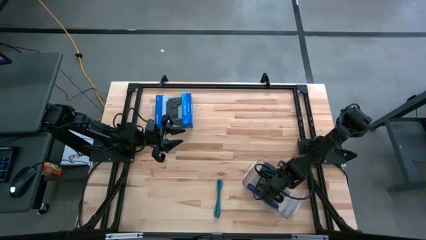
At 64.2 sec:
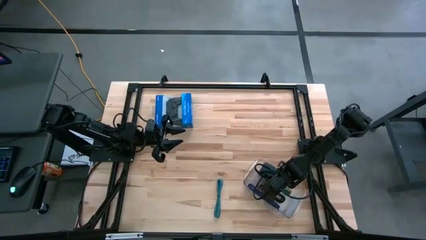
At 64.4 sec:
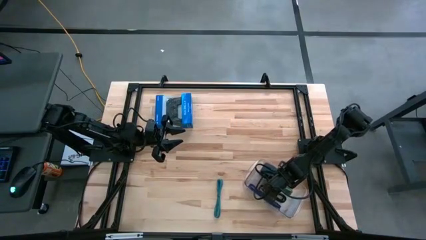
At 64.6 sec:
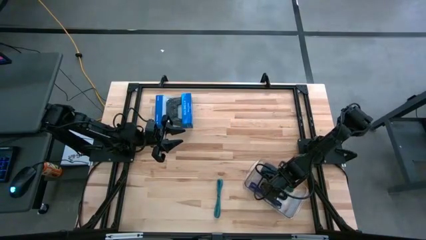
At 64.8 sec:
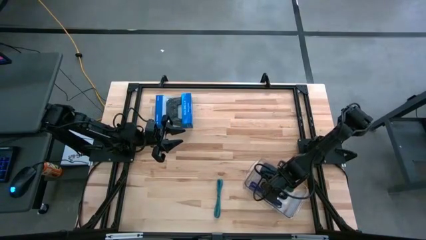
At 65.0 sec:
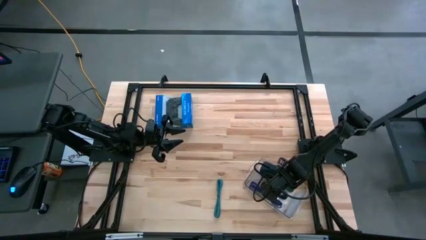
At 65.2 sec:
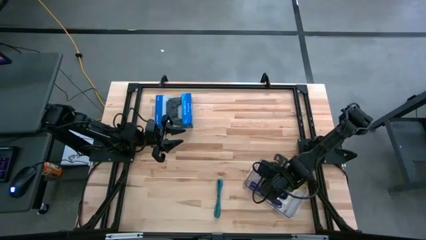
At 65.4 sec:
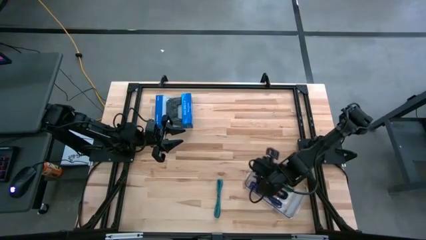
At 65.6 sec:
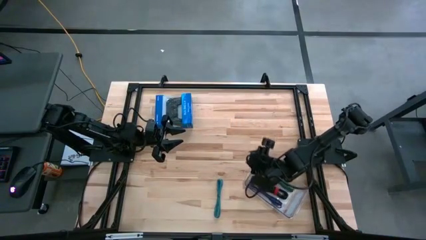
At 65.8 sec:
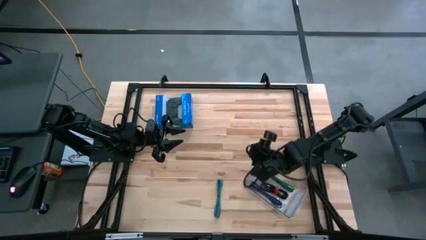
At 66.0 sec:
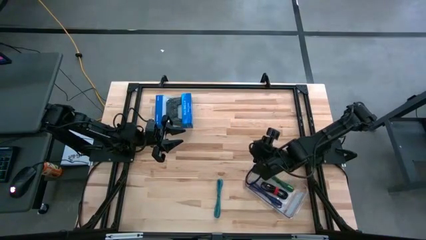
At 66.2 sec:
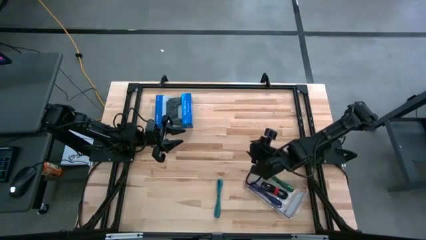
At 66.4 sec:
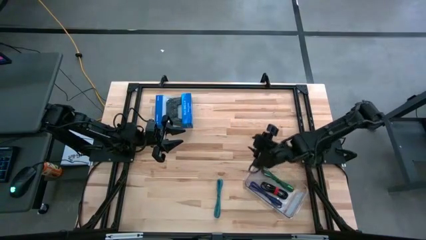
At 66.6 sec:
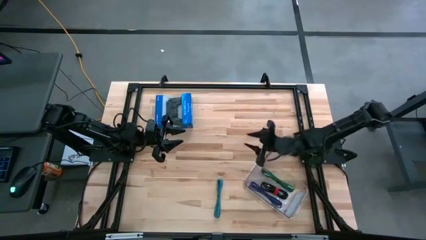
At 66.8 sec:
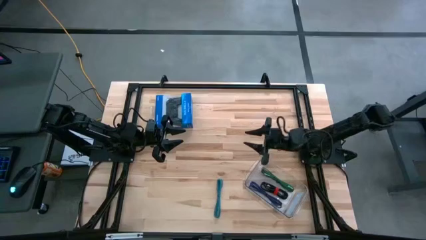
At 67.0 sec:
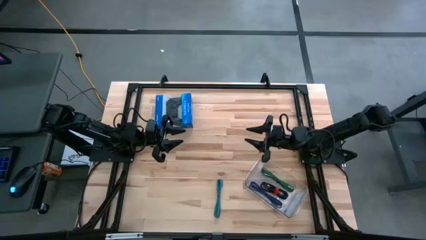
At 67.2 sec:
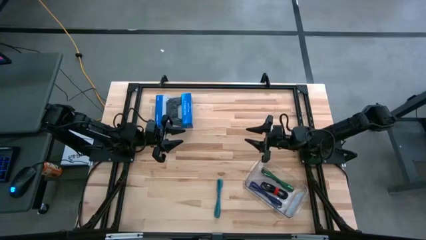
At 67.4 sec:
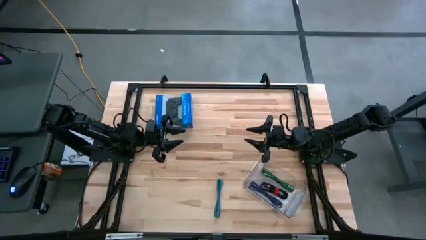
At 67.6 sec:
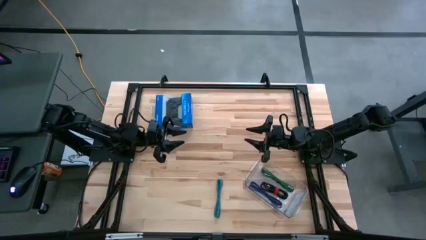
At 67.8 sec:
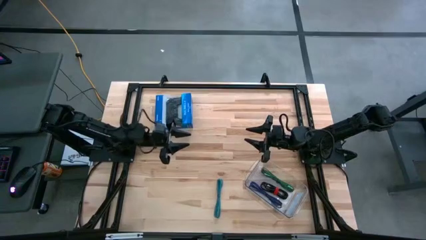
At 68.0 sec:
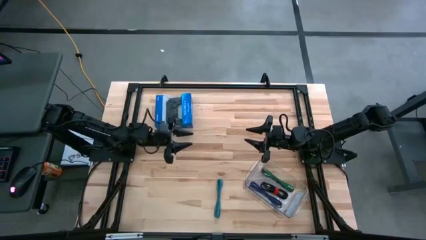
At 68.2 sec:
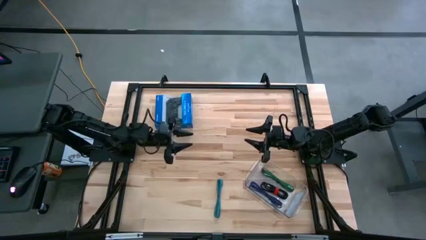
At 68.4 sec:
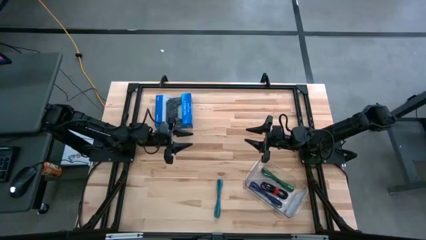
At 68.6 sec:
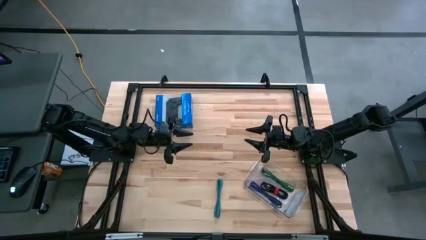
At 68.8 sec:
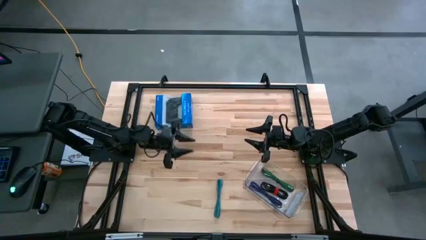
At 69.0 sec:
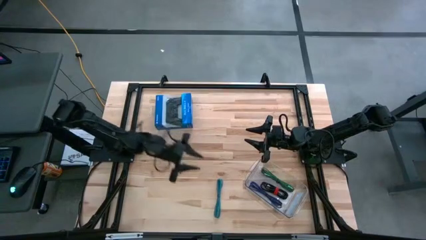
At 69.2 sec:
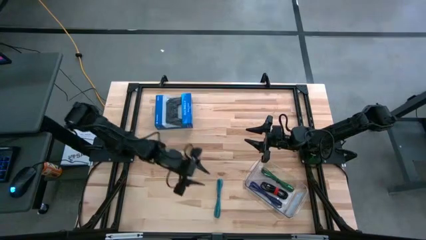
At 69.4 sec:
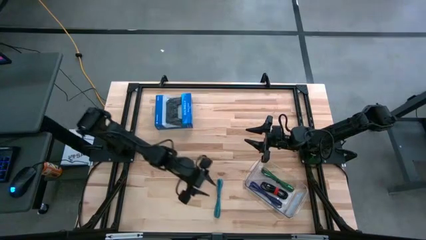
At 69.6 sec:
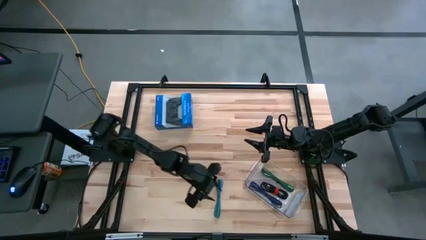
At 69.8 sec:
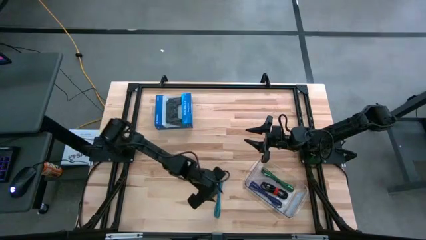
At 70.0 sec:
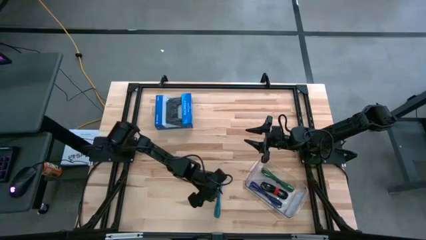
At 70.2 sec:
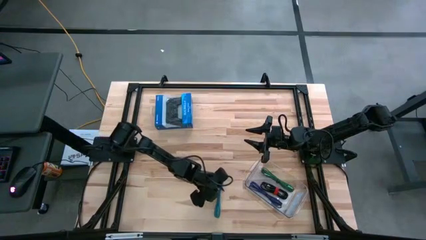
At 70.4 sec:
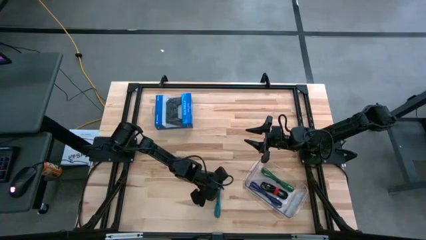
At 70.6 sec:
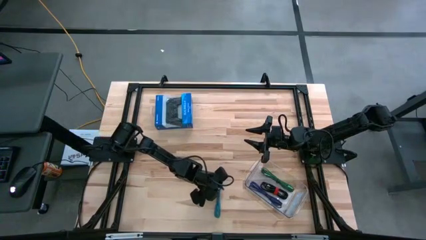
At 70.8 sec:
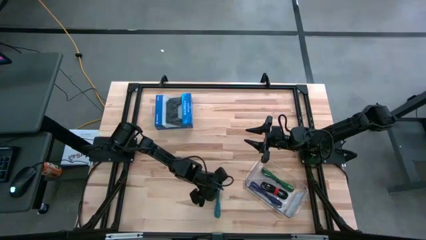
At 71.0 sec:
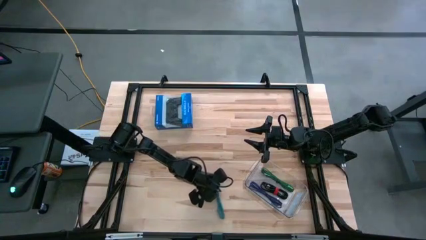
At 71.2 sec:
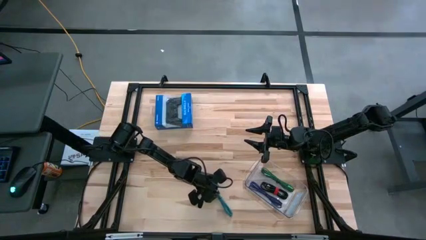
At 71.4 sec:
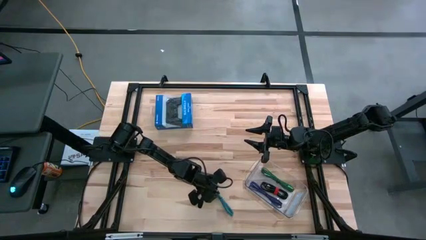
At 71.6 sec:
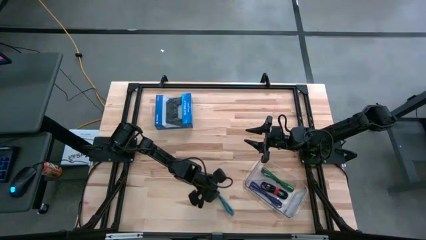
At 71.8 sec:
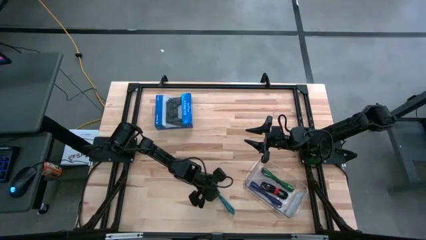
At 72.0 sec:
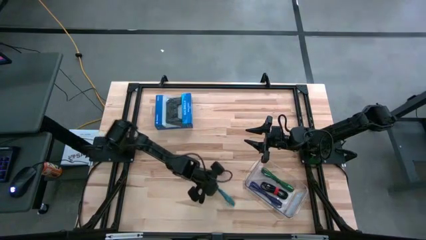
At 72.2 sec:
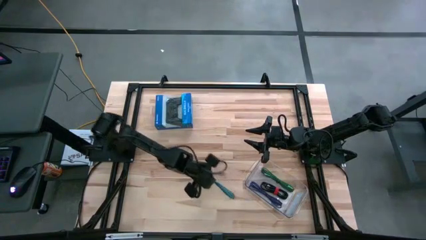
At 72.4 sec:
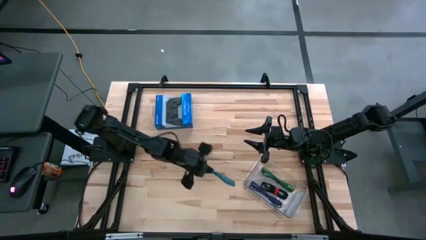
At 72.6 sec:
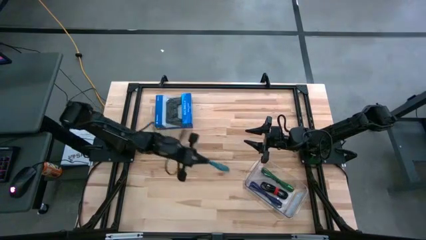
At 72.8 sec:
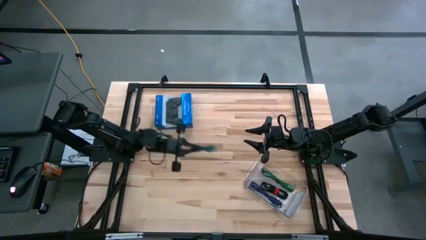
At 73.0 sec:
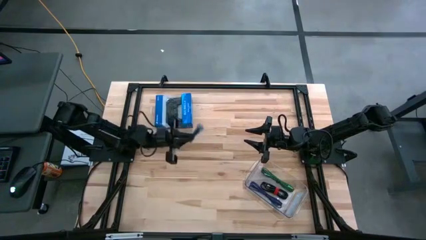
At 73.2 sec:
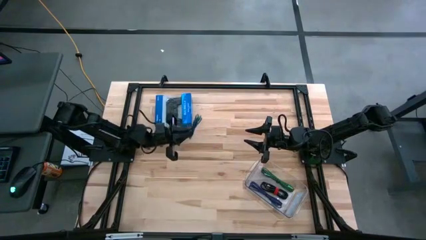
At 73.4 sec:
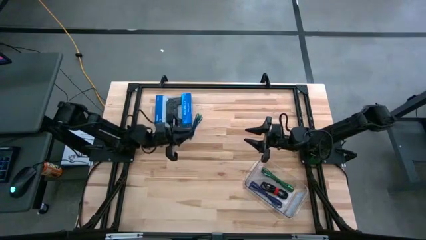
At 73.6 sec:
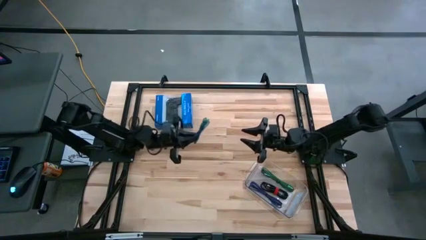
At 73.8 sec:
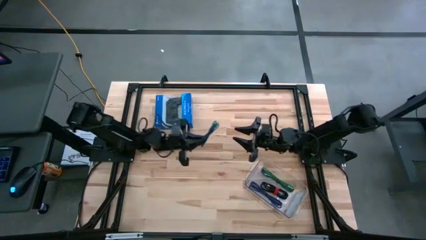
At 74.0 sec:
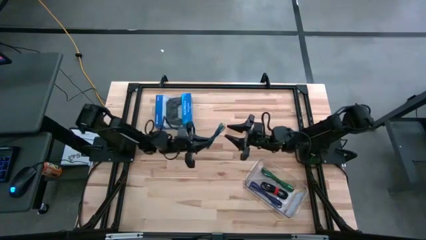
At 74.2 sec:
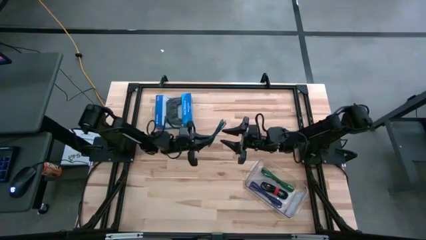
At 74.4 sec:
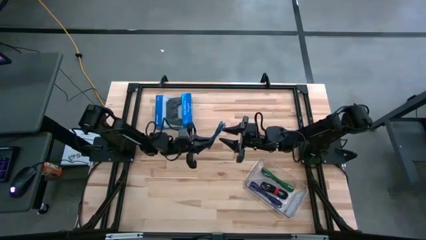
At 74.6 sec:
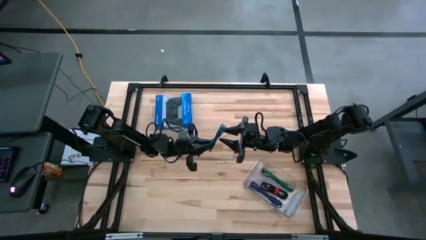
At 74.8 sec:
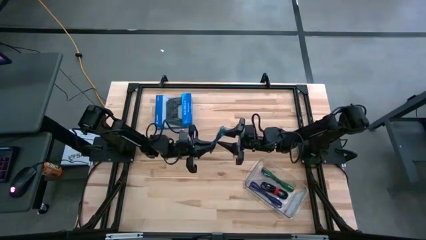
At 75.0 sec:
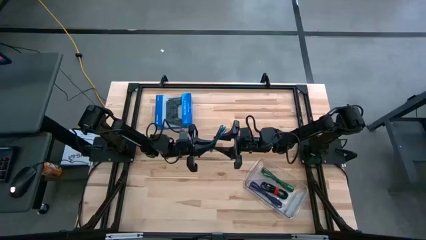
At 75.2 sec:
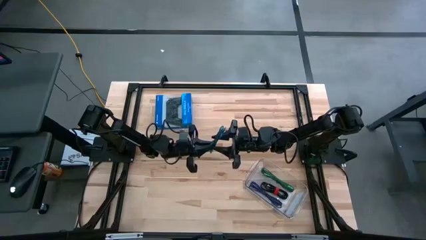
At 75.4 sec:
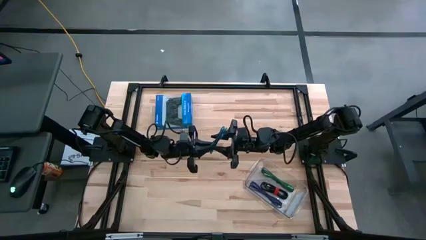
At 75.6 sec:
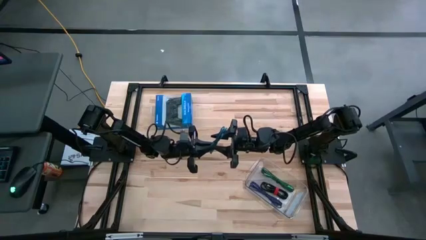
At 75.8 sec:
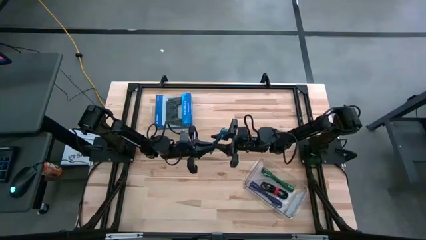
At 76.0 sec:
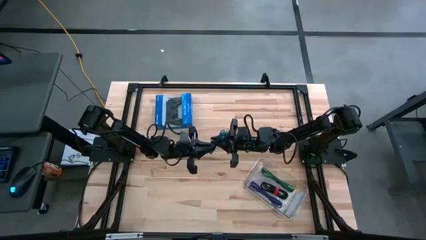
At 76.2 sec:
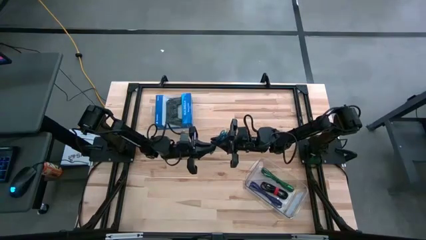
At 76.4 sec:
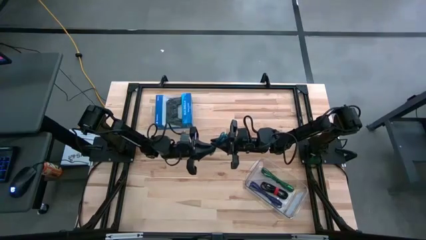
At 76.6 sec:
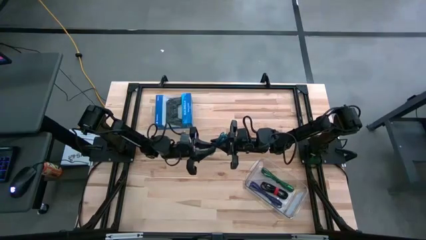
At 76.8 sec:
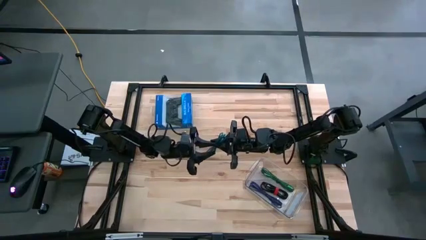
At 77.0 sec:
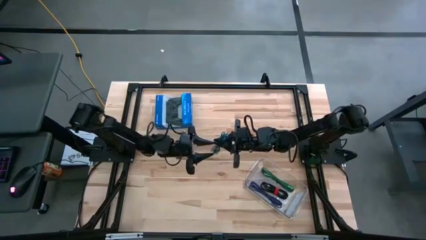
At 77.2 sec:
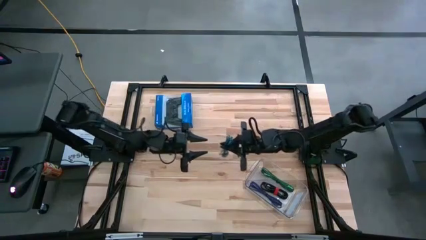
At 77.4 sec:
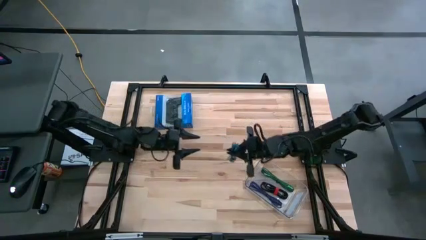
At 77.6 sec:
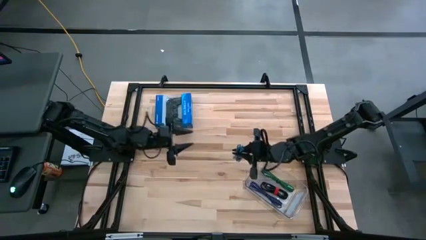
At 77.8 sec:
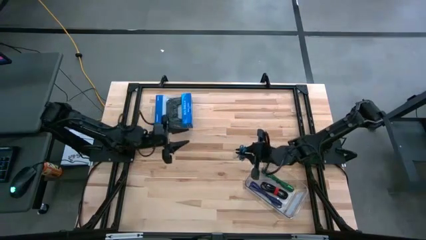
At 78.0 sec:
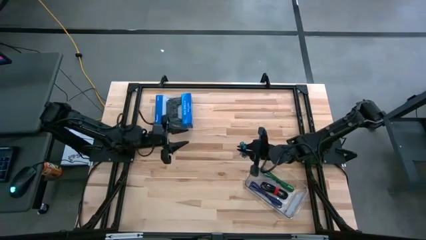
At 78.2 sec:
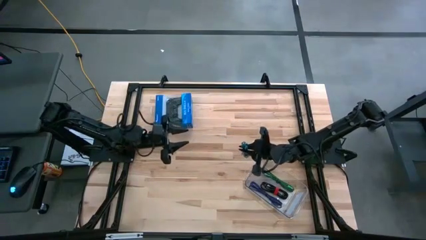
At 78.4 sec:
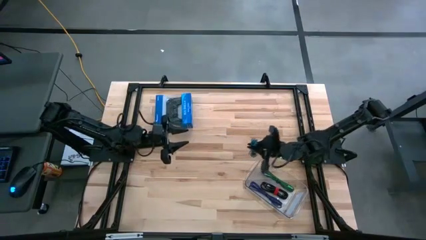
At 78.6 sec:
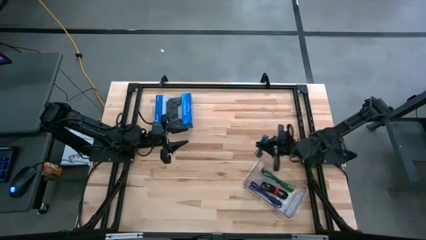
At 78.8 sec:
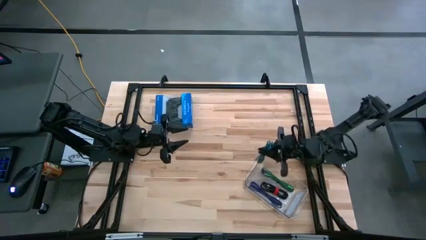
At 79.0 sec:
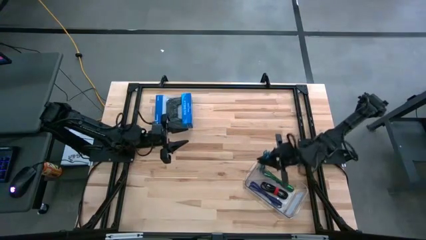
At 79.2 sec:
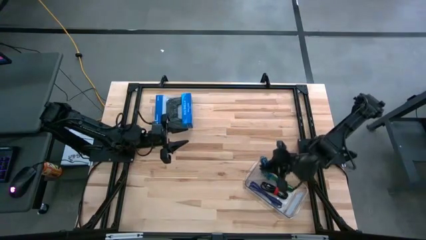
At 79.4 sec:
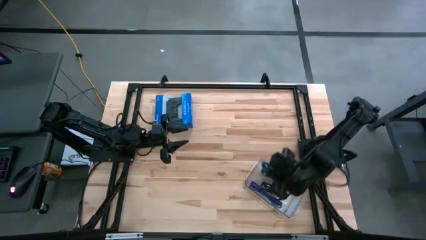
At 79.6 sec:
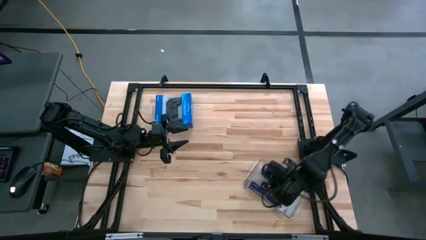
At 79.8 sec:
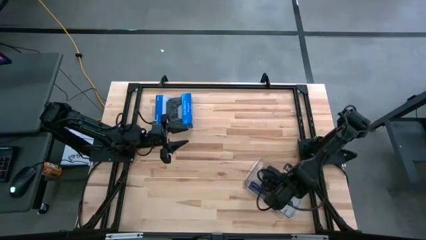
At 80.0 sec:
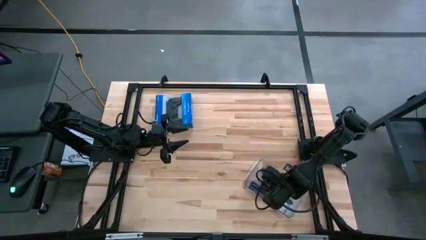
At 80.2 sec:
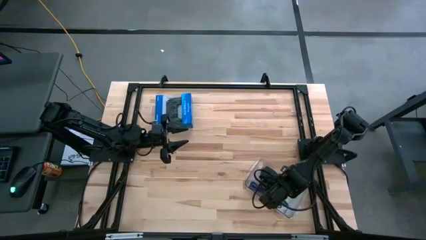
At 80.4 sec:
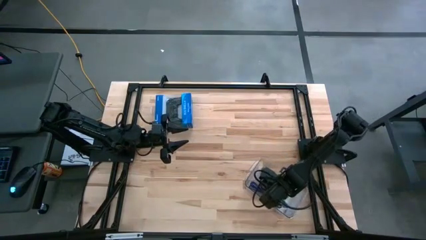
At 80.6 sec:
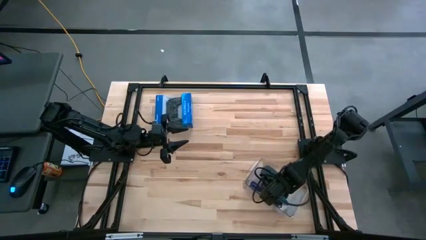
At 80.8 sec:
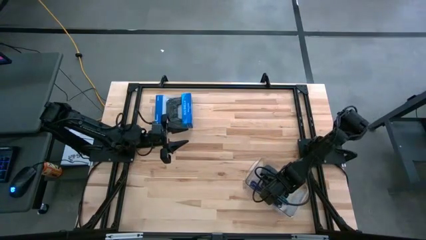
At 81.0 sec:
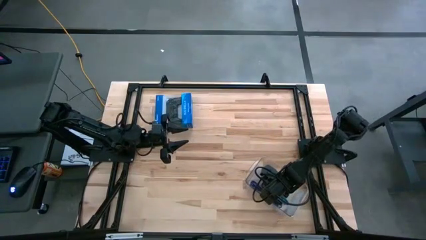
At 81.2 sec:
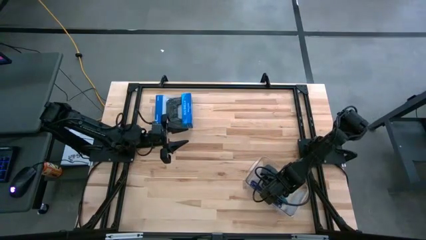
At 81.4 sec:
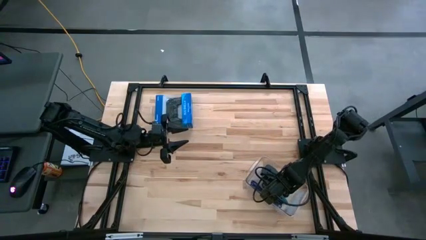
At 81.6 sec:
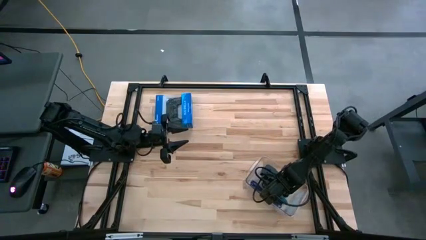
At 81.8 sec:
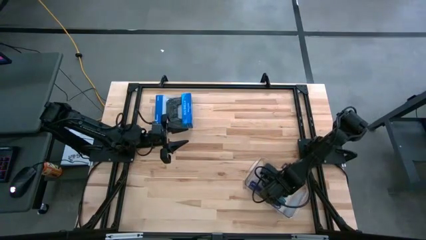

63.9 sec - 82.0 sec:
Task: Pick and place USB-C Cables
Put the blue charger cable into the transparent bin
